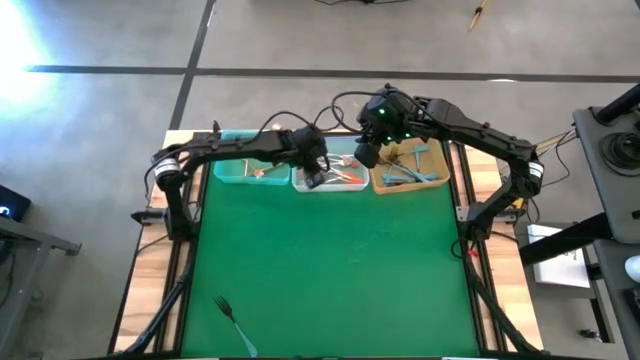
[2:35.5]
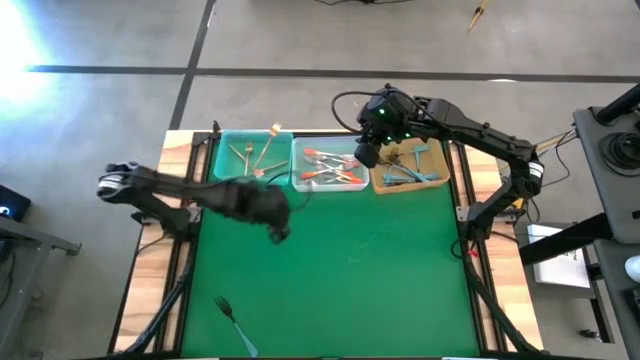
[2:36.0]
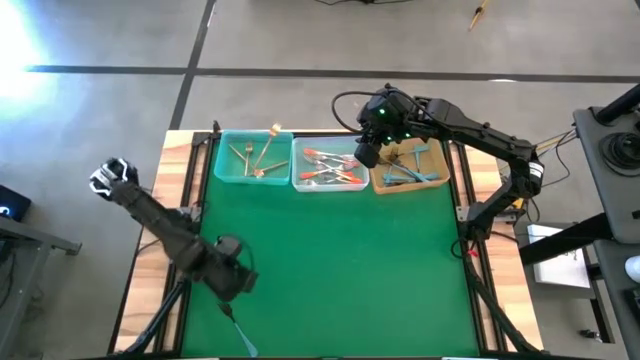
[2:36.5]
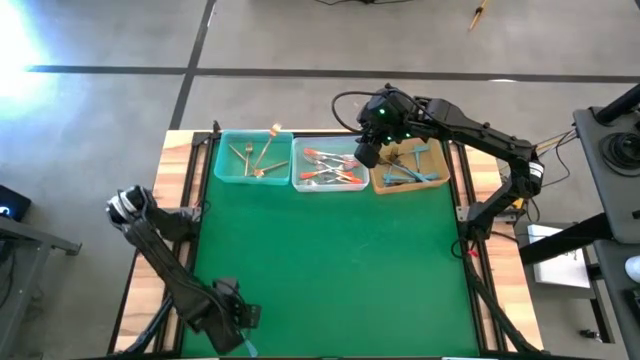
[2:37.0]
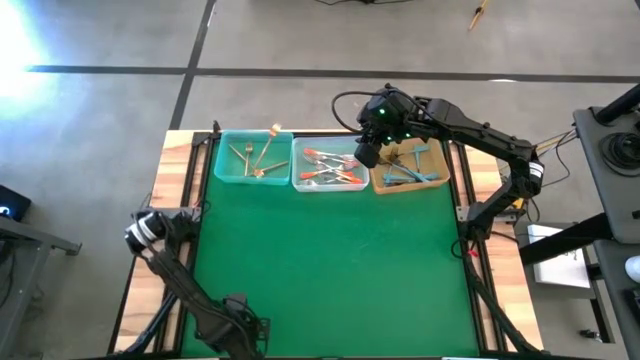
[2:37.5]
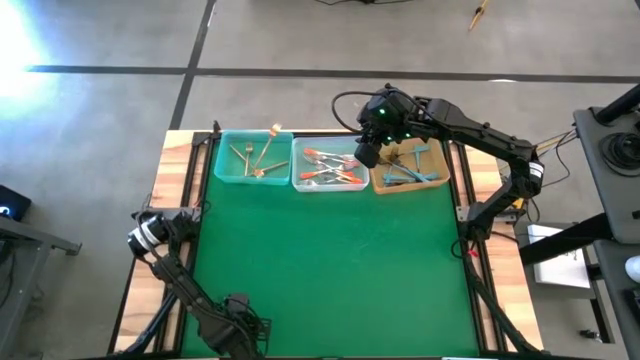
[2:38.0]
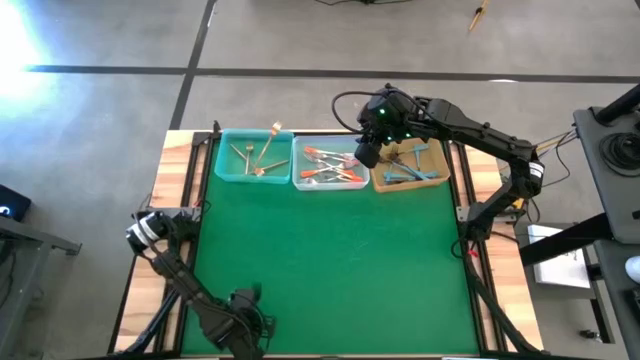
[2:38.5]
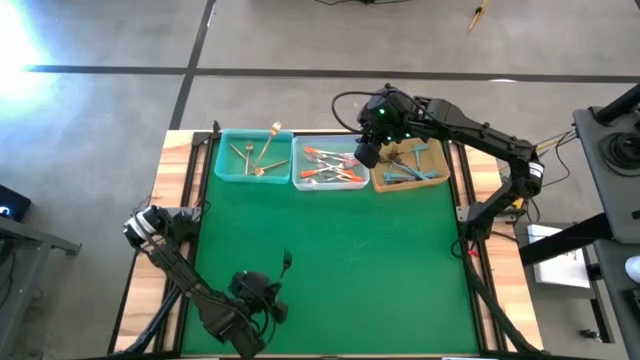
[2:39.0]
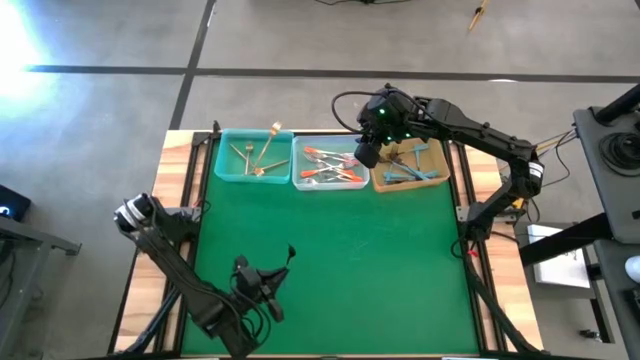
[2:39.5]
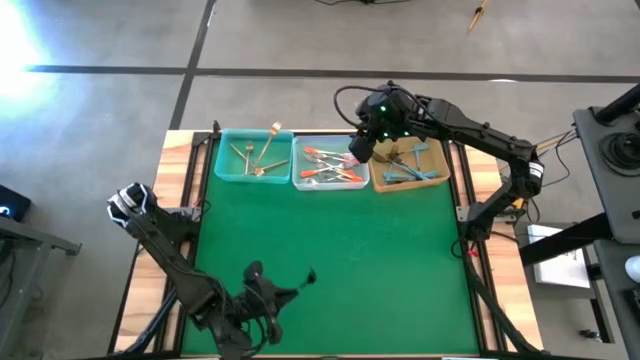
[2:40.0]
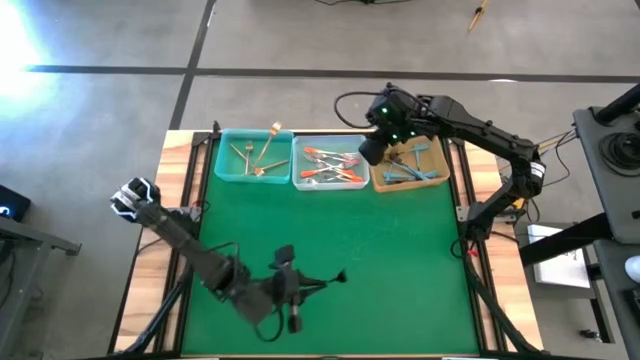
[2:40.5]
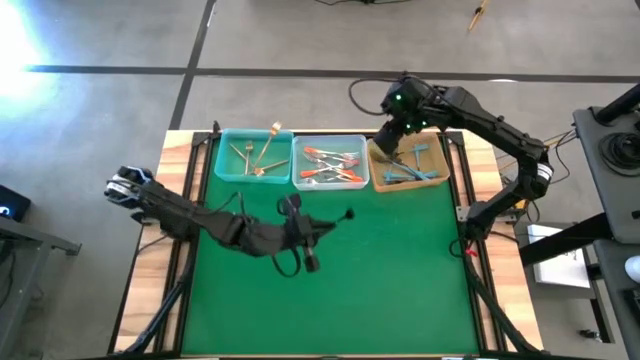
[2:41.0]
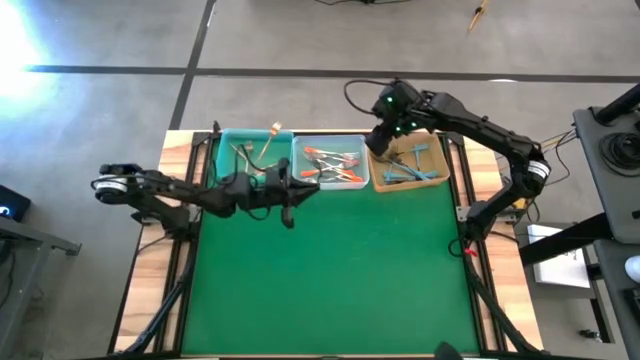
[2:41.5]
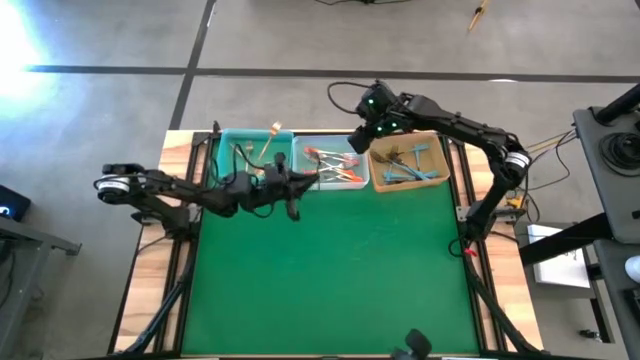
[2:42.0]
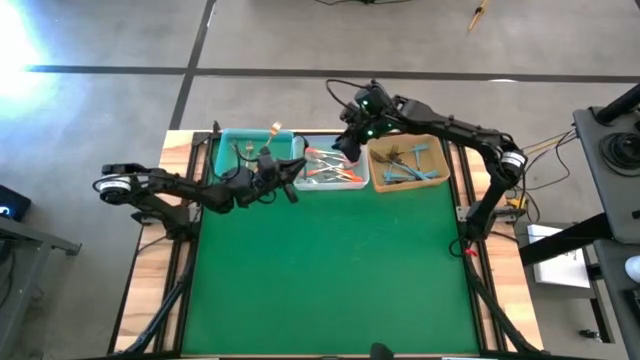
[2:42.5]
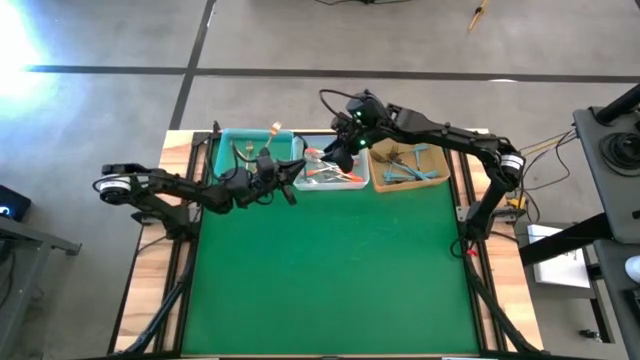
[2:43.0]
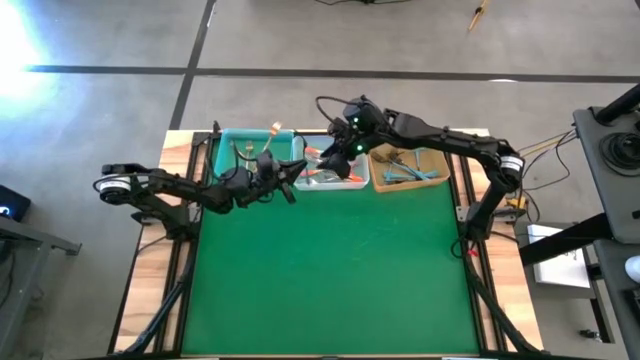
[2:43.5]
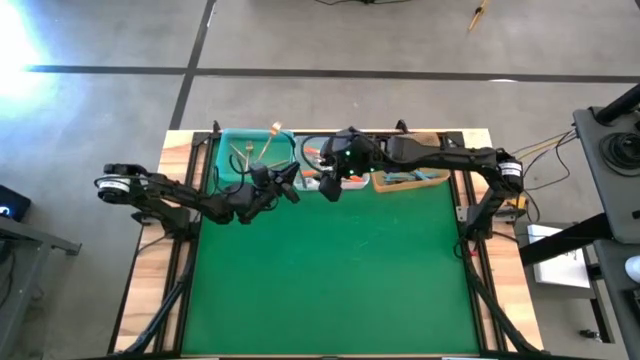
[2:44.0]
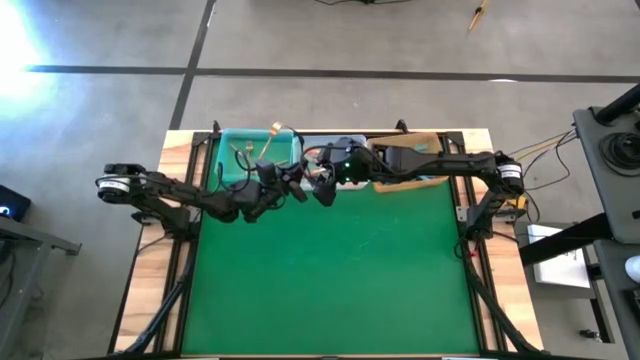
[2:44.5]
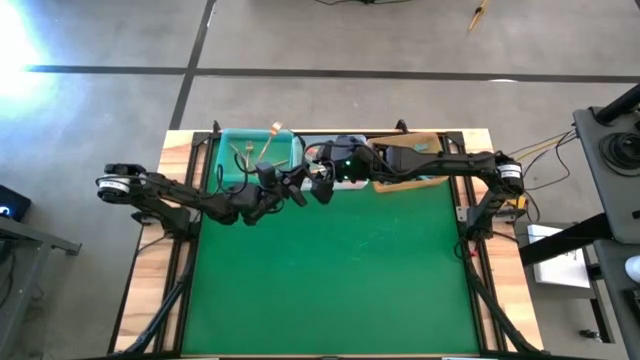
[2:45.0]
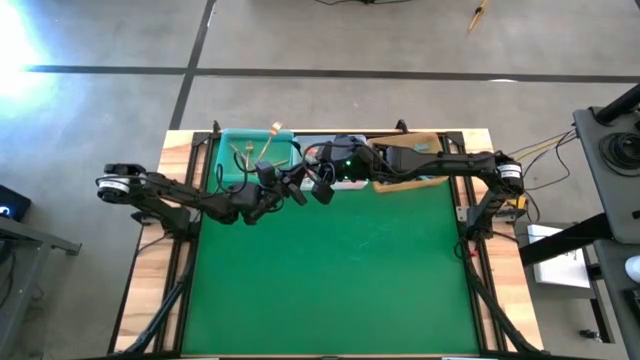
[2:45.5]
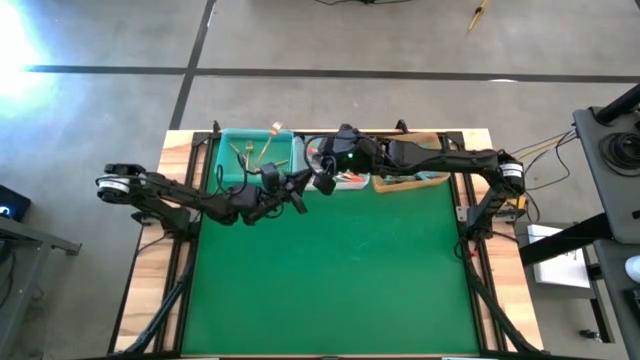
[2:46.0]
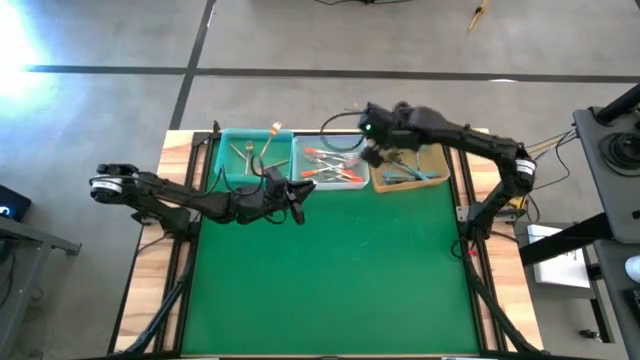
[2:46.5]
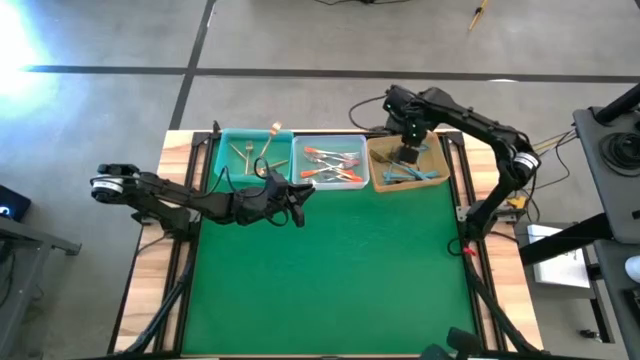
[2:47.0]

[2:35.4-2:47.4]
Task: Sort silverware by color (type)
Put the blue fork into the orange bin

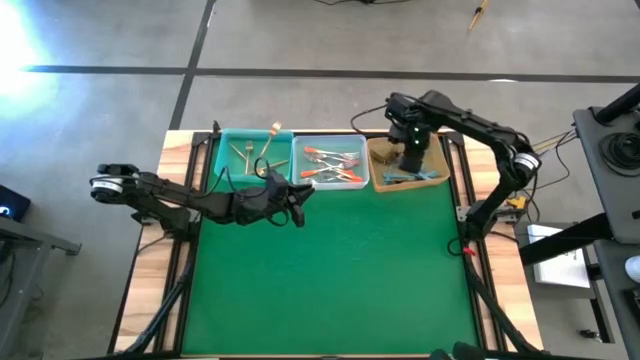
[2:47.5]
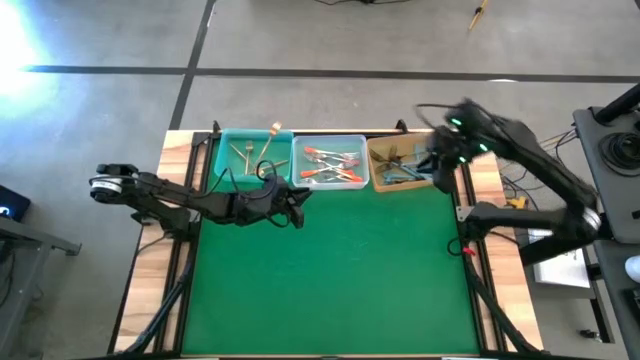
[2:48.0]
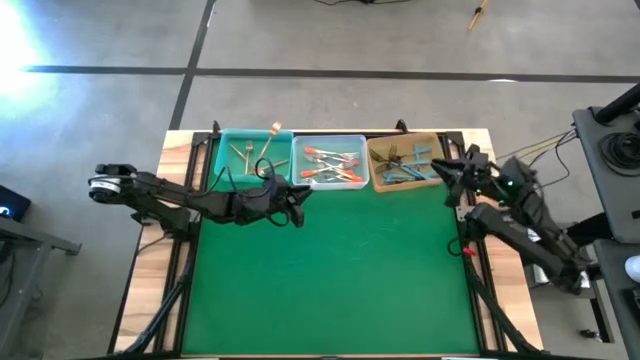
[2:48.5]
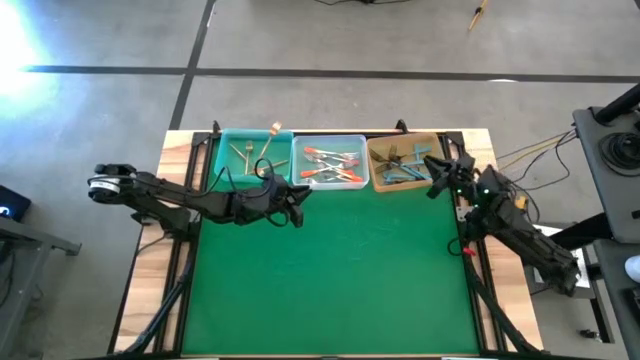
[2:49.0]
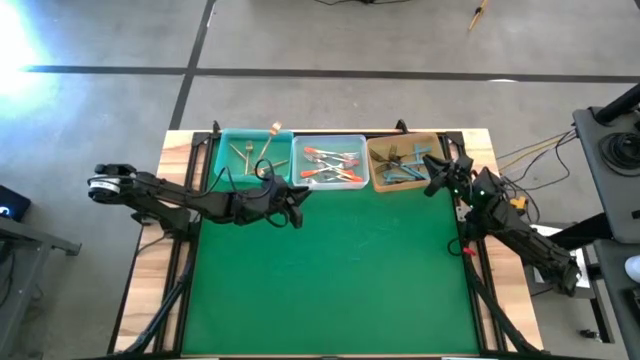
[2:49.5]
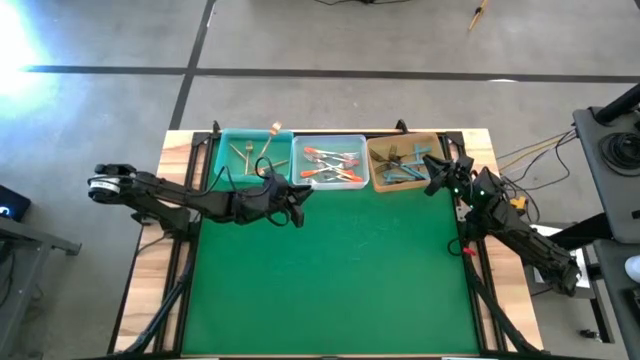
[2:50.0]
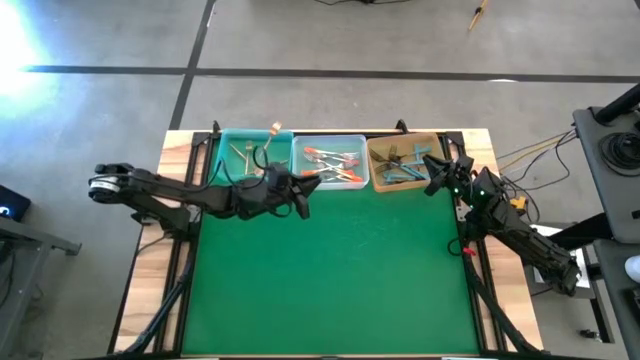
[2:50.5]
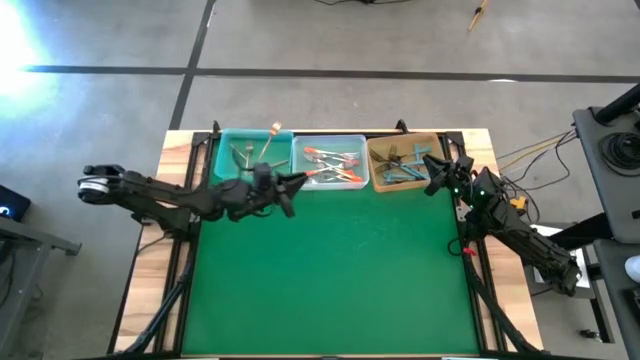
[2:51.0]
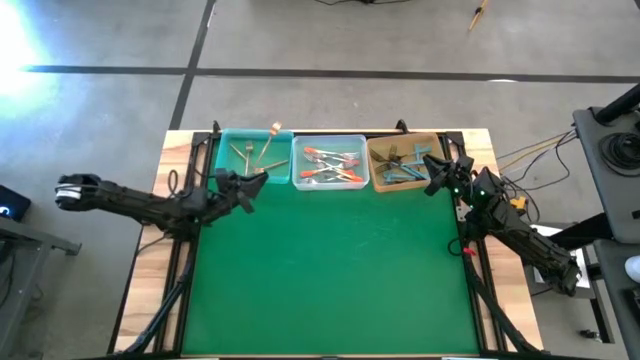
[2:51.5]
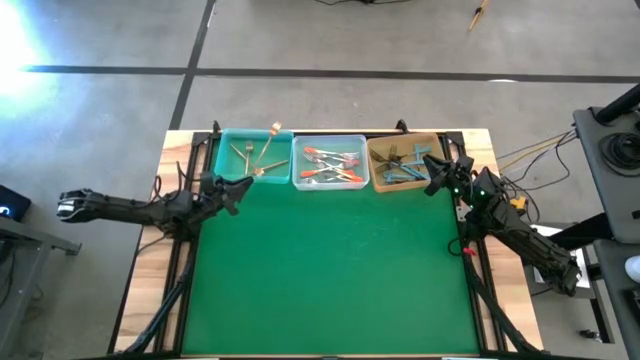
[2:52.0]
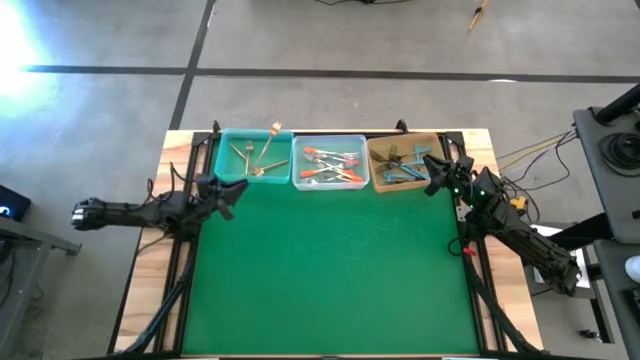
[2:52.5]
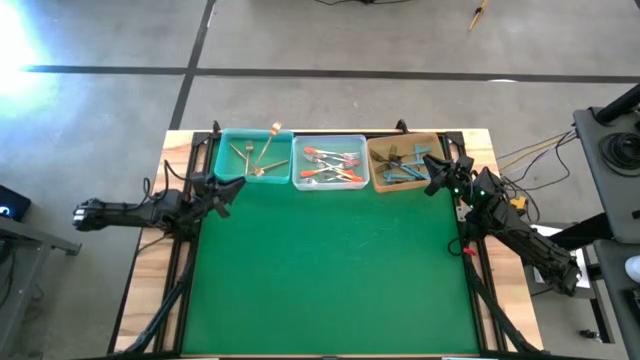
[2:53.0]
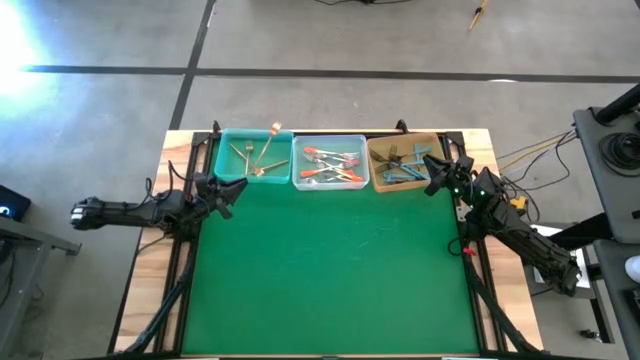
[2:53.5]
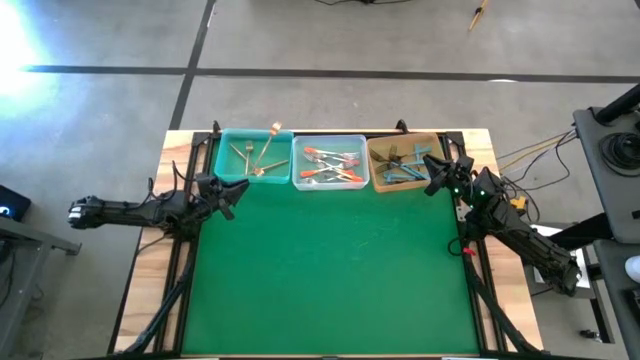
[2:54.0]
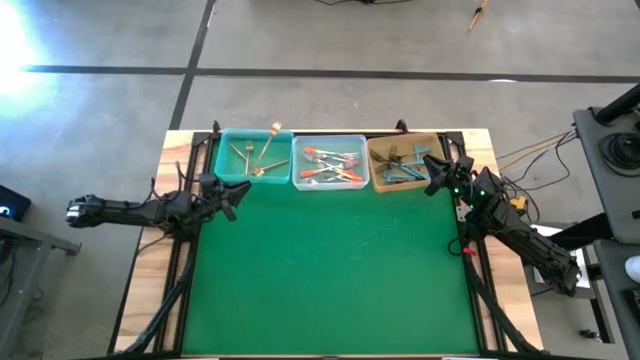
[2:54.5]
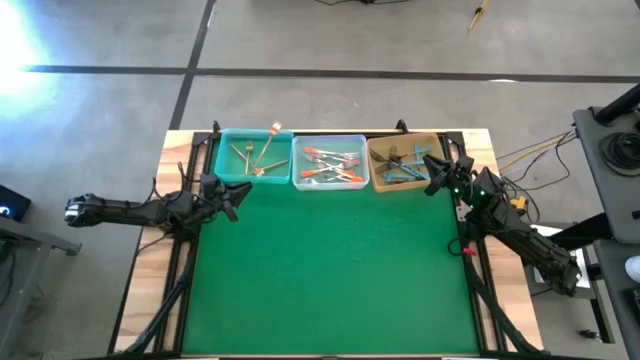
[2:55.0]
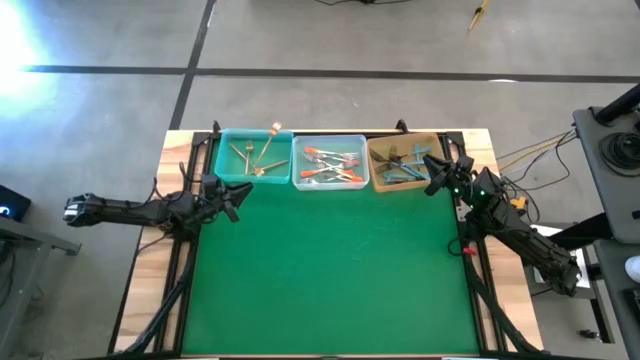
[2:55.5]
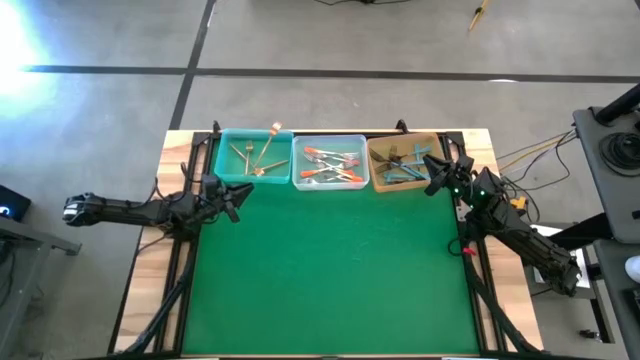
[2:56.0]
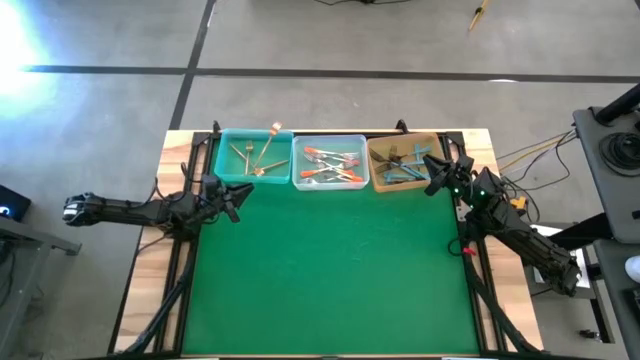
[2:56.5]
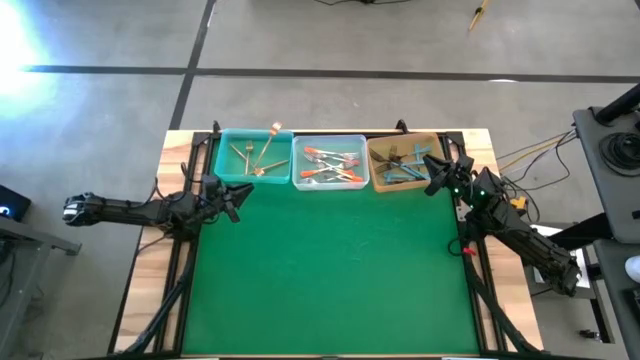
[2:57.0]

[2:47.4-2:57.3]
Return to Home Position
